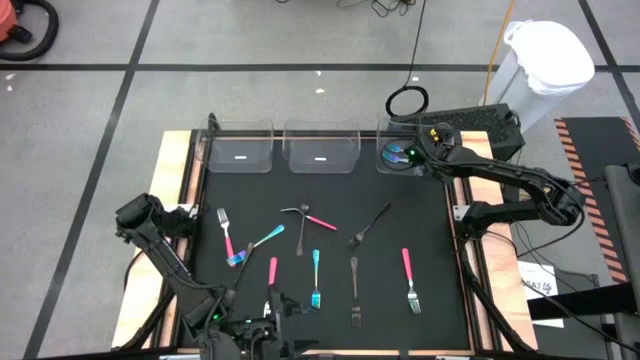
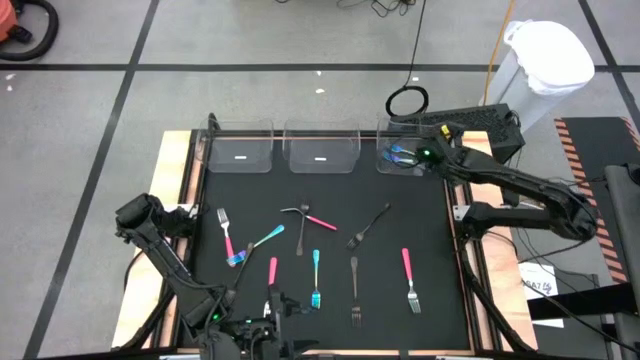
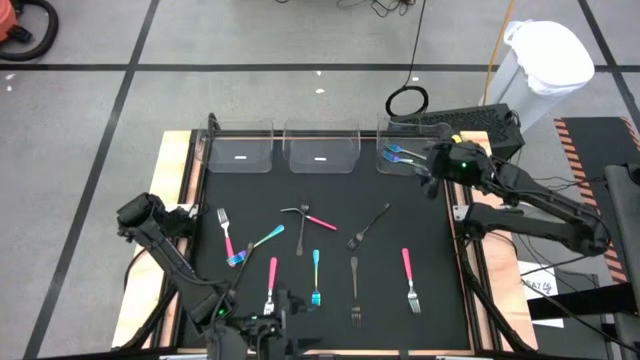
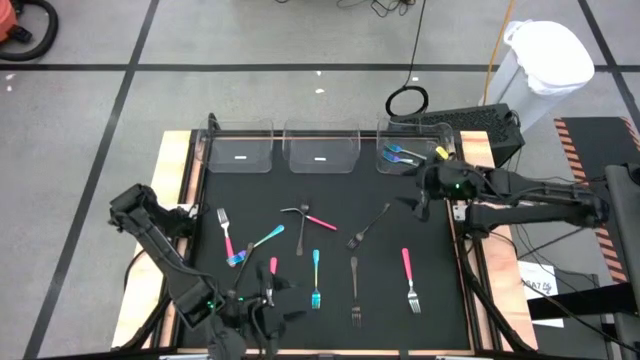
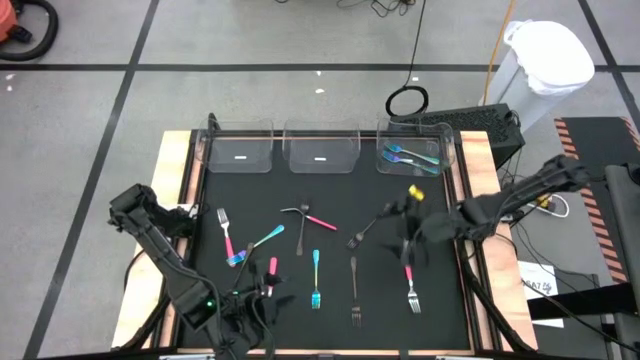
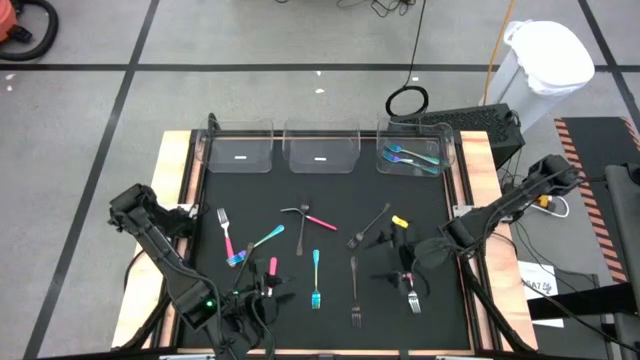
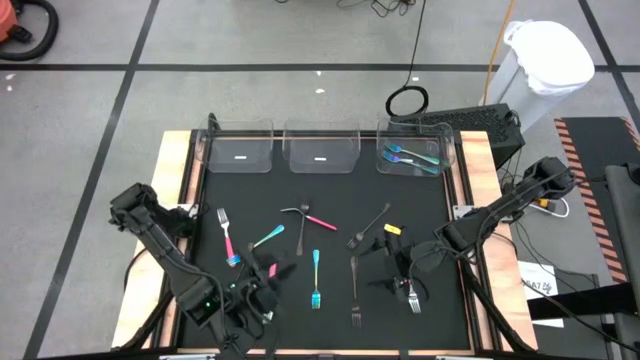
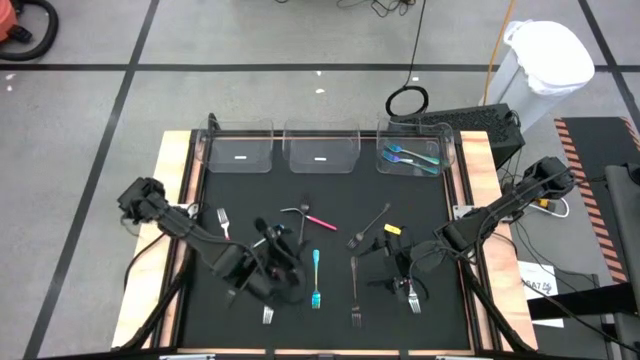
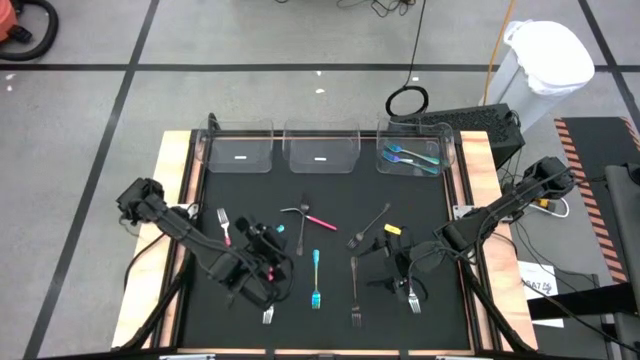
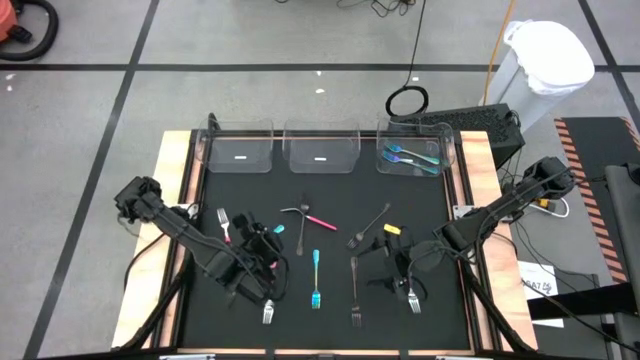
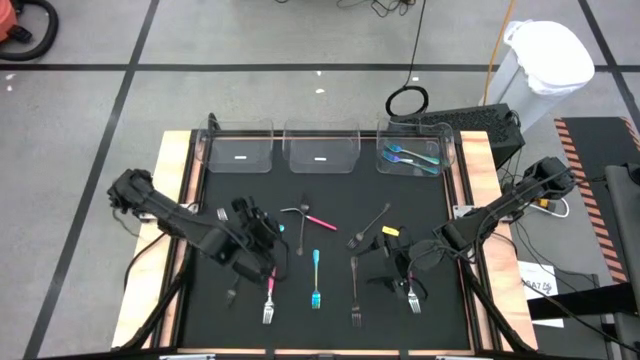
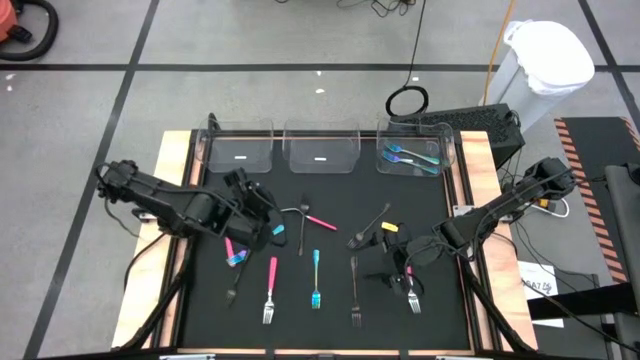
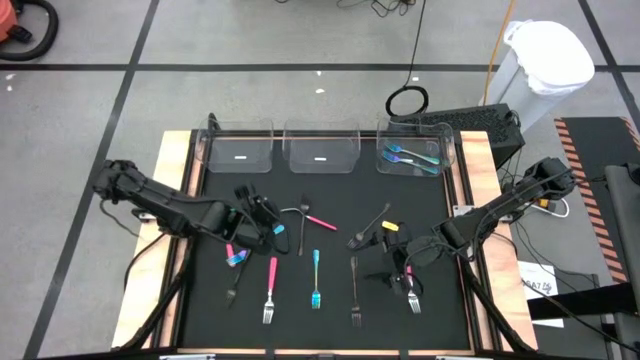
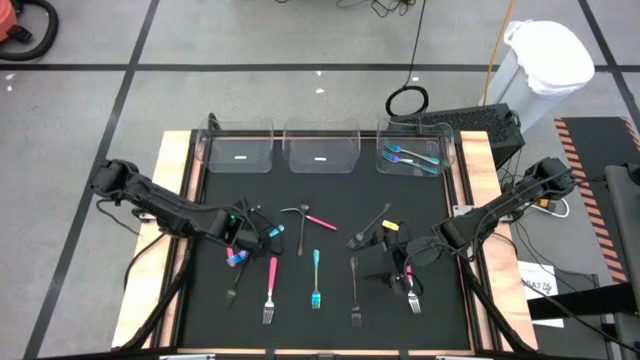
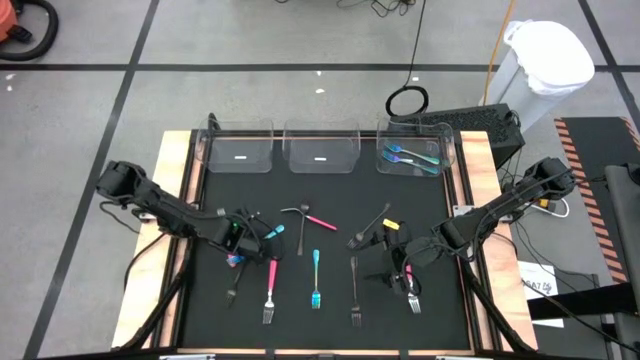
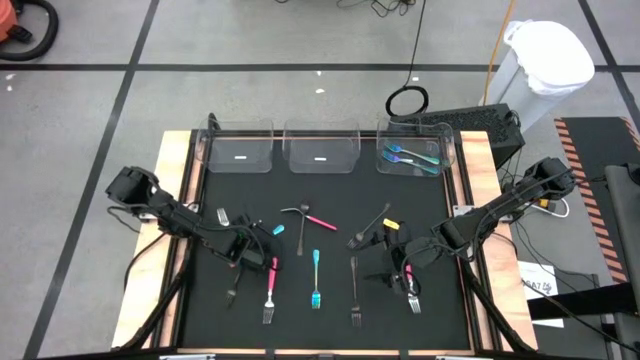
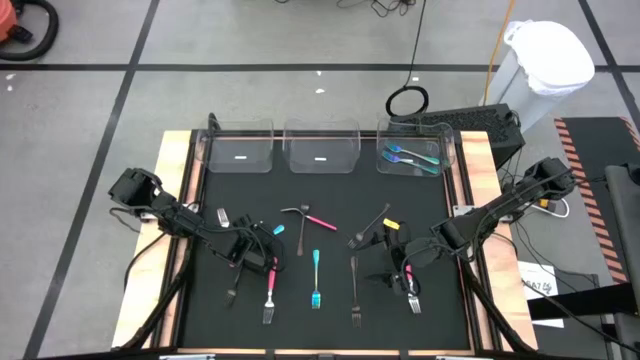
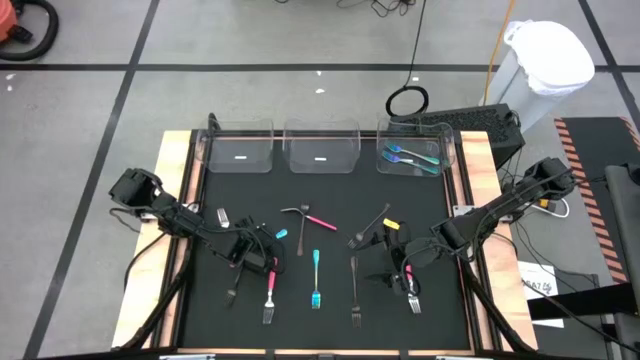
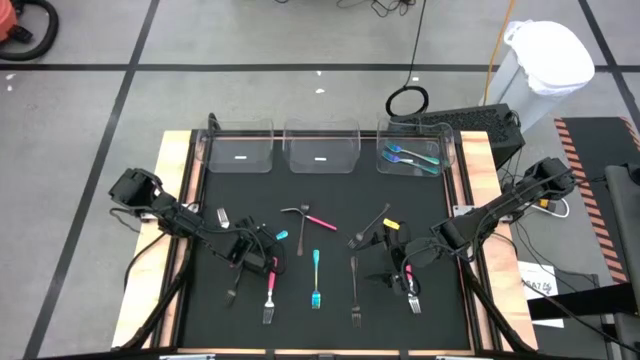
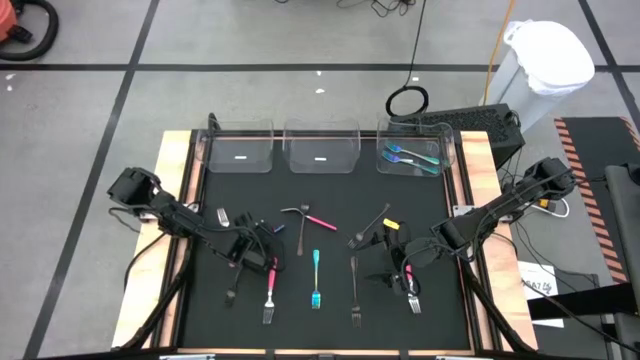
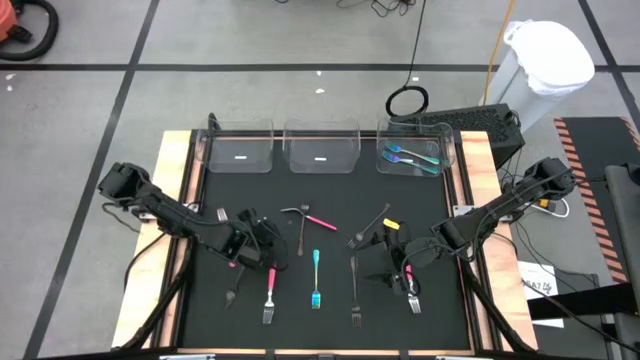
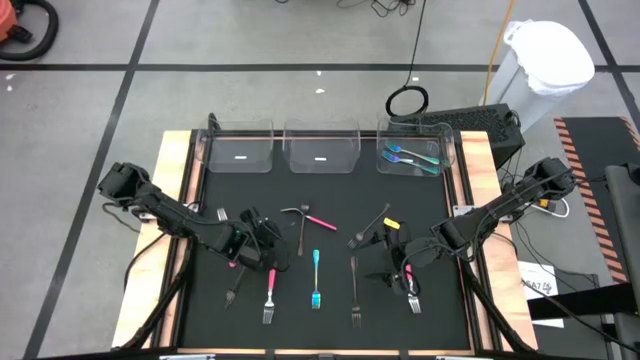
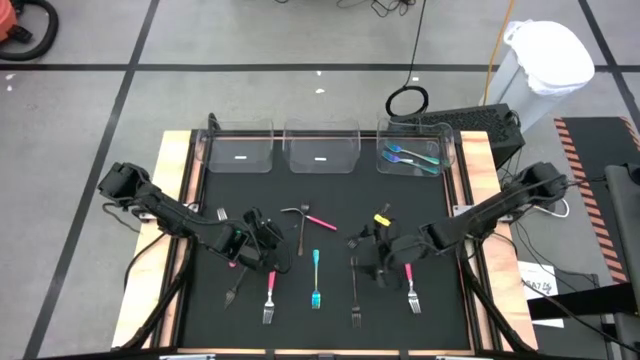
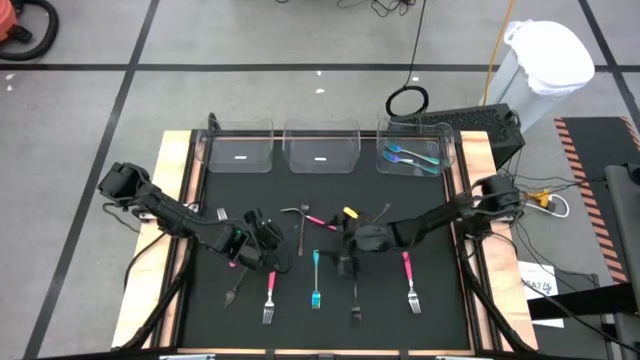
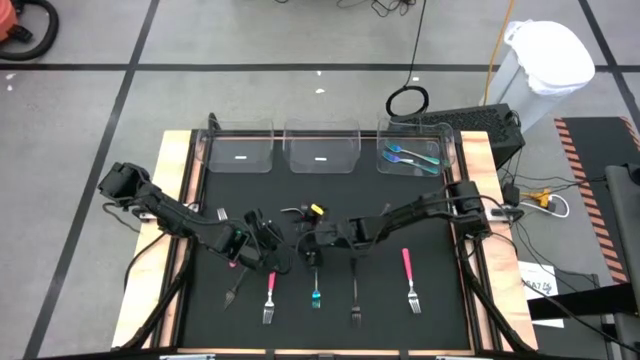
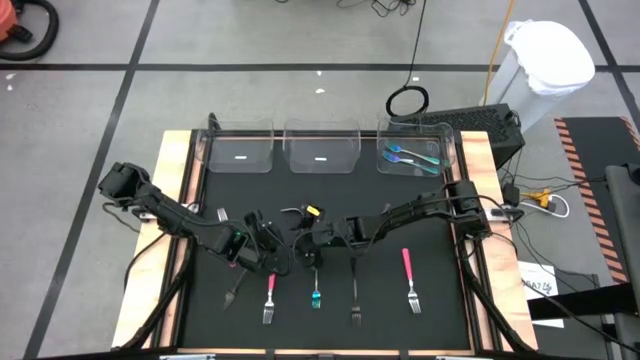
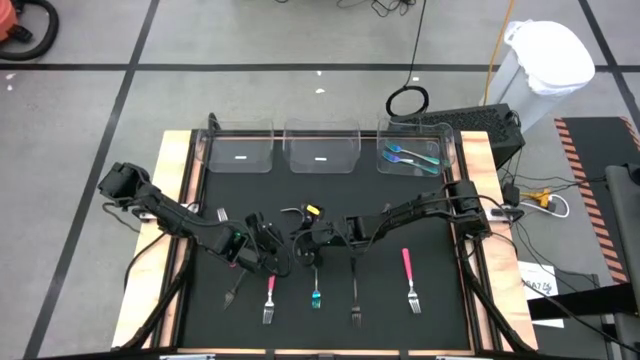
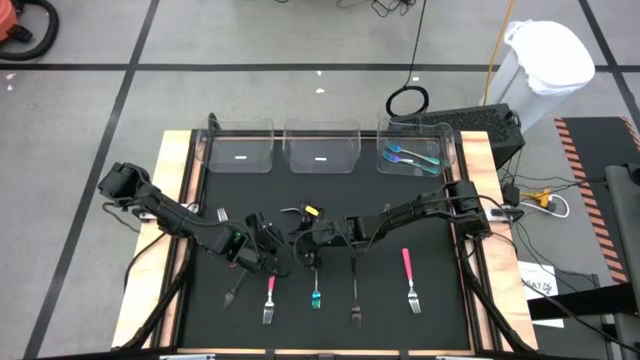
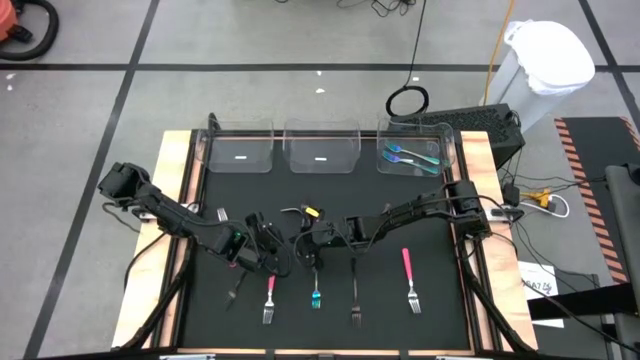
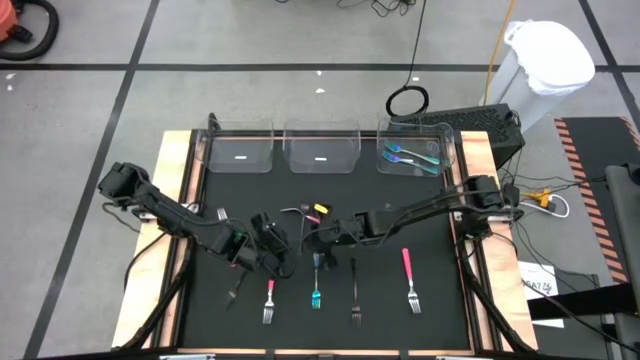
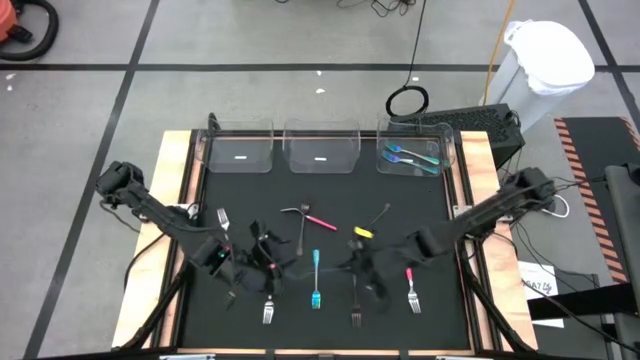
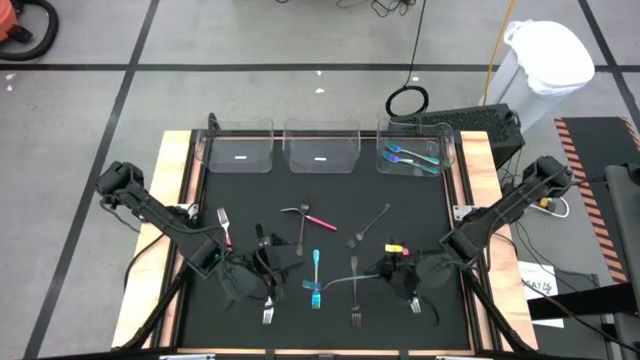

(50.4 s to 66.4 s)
Task: Sort silverware by color (type)
Put the blue fork into the right transparent bin

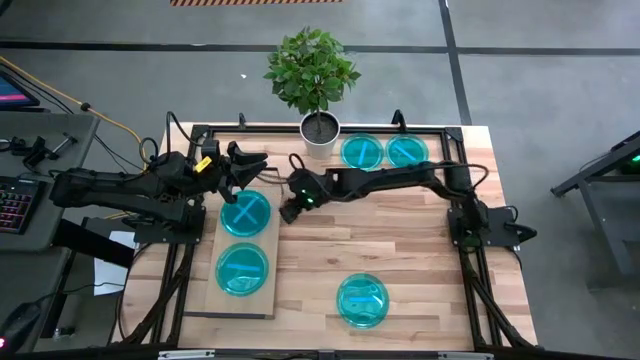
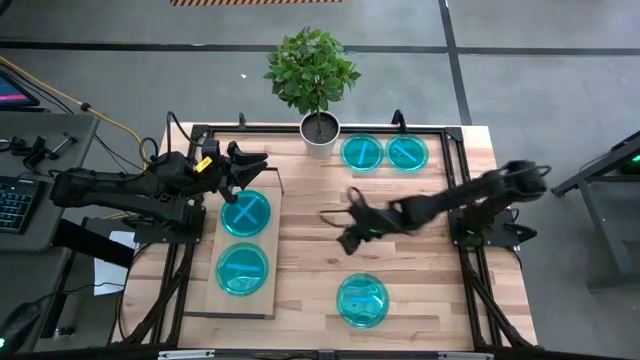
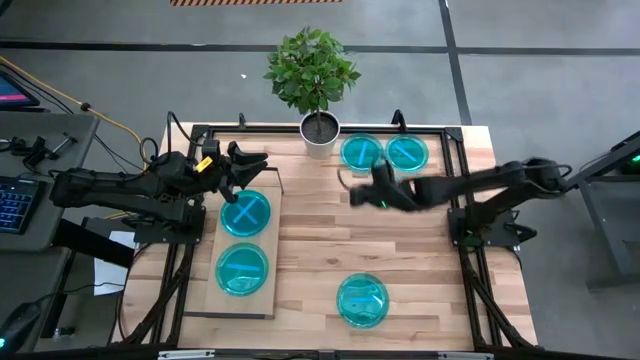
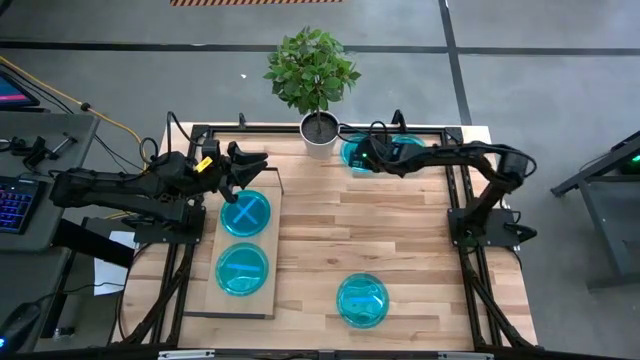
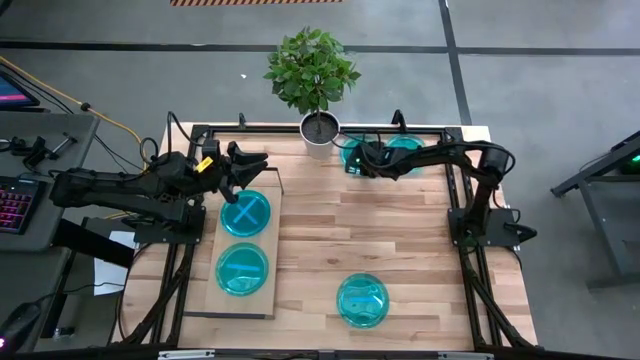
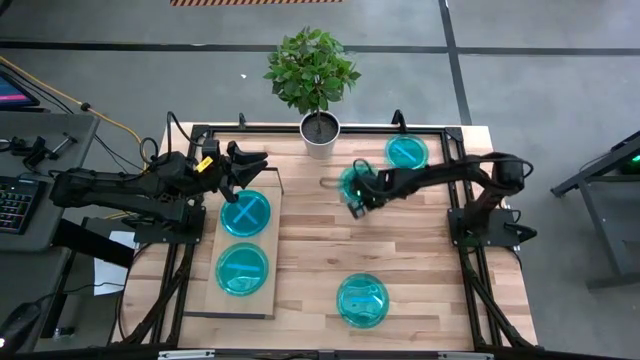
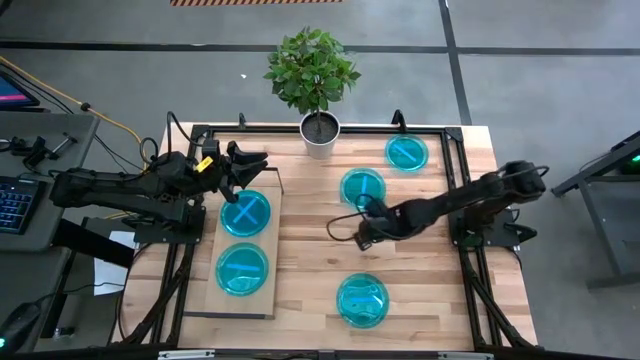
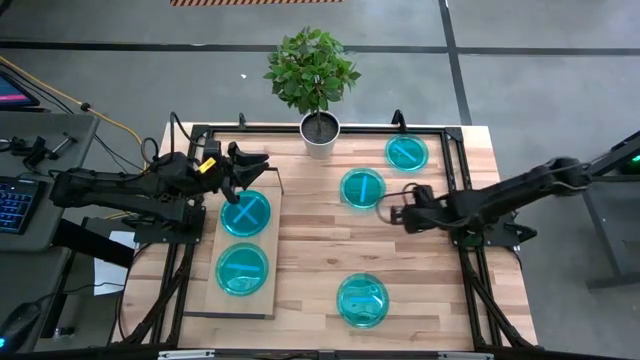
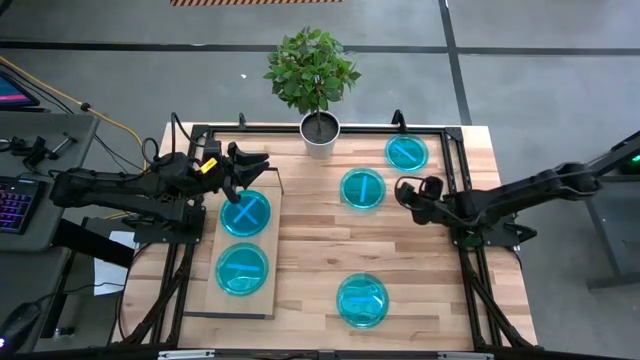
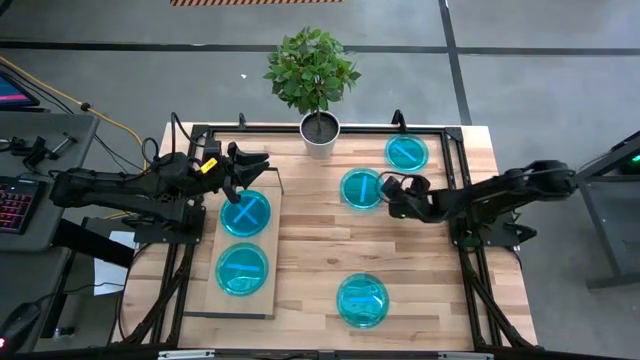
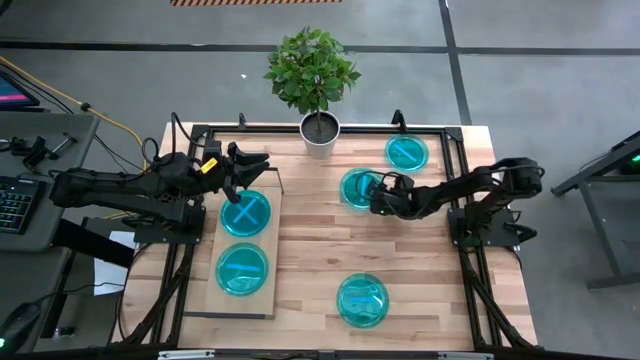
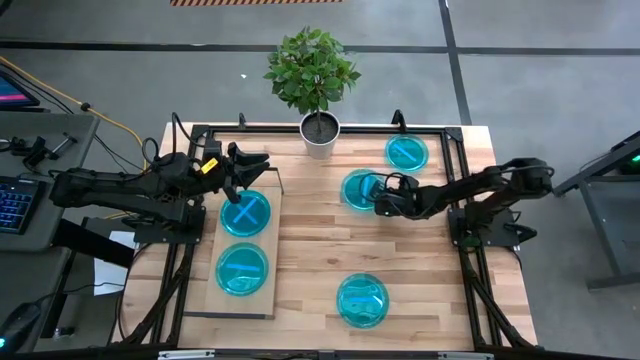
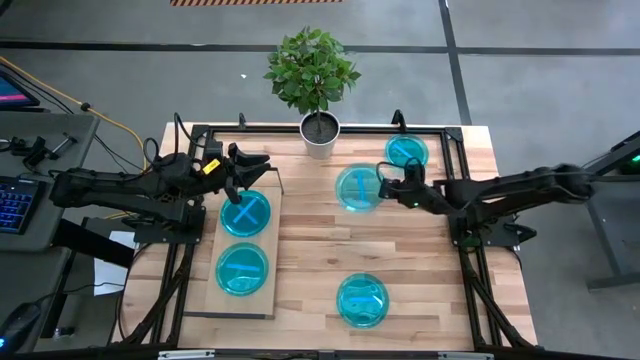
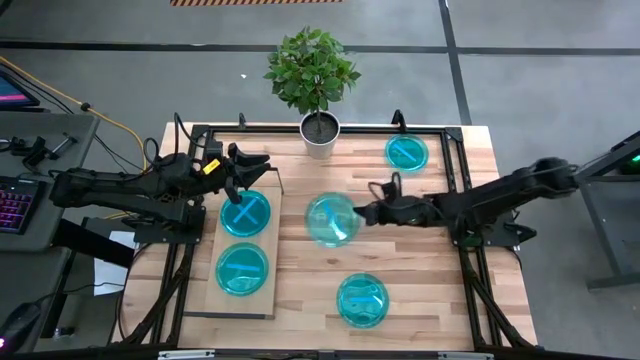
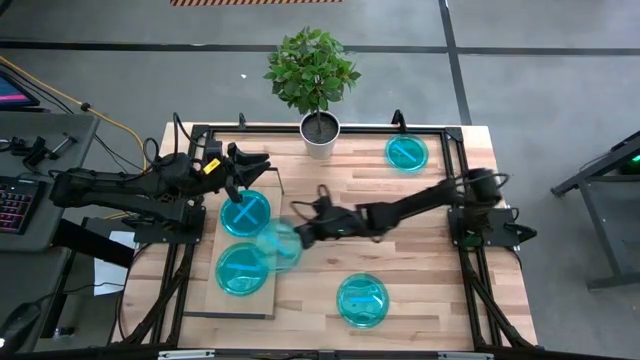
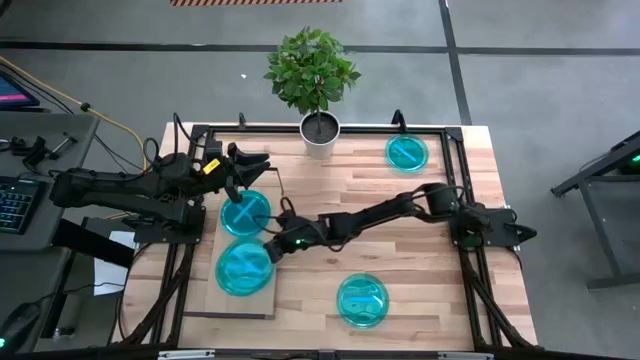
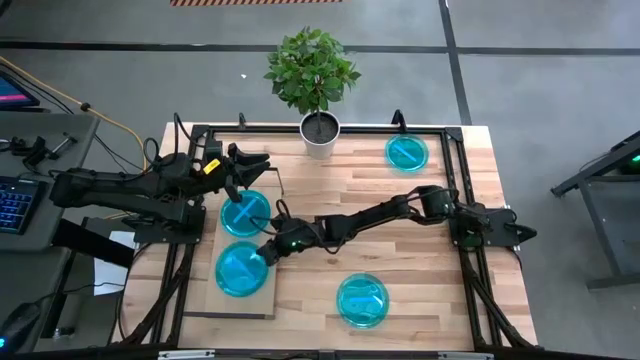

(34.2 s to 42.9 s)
Task: Place and stack plates onto a shelf
Stack the top left blue plate on the bottom blue plate on the shelf
